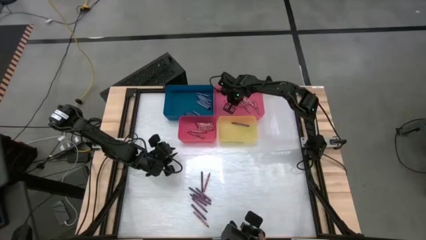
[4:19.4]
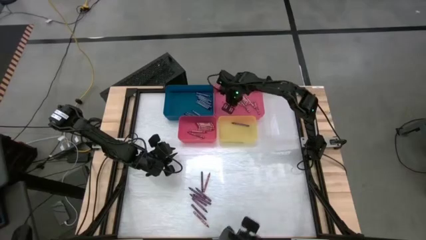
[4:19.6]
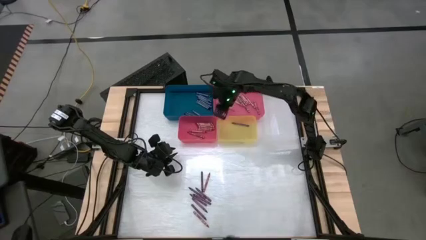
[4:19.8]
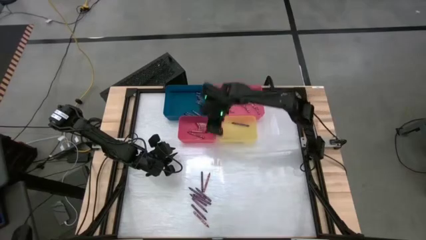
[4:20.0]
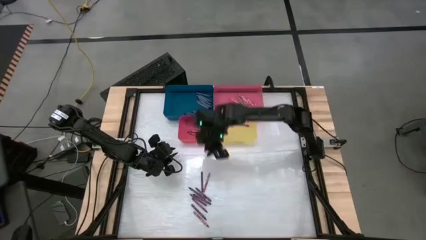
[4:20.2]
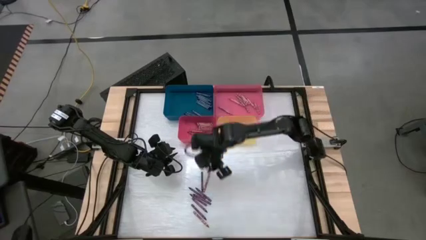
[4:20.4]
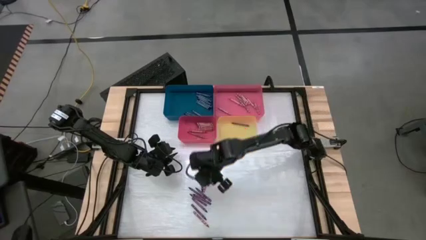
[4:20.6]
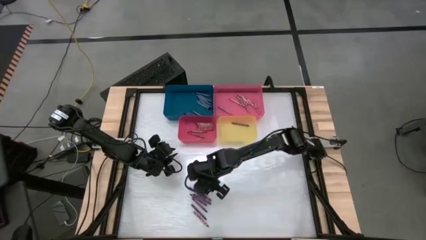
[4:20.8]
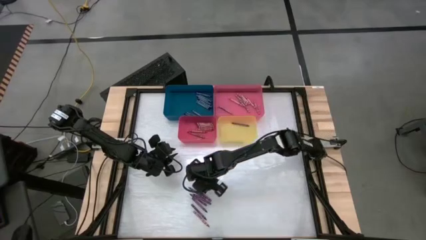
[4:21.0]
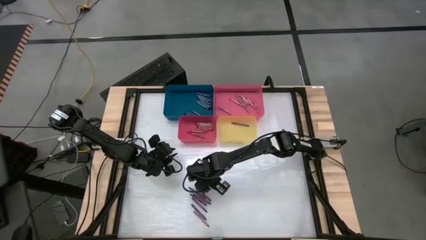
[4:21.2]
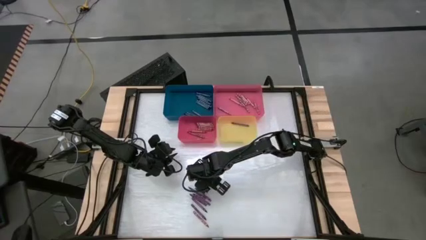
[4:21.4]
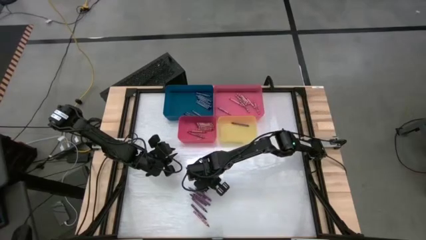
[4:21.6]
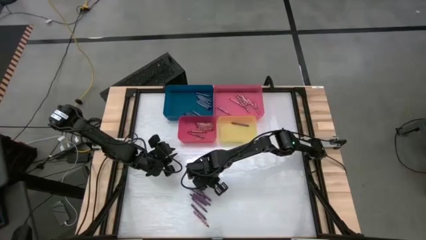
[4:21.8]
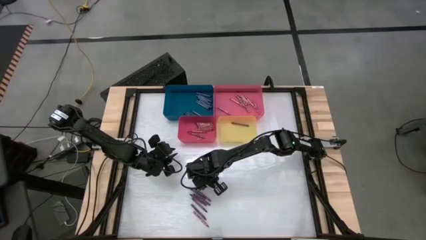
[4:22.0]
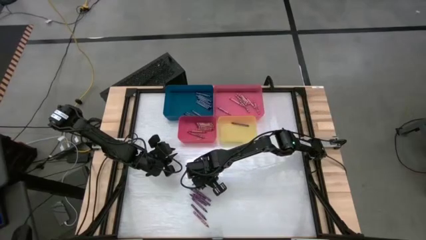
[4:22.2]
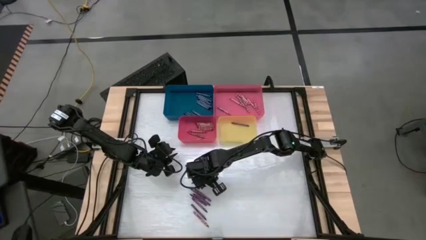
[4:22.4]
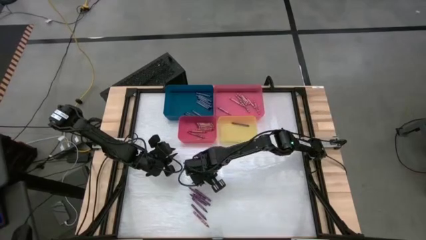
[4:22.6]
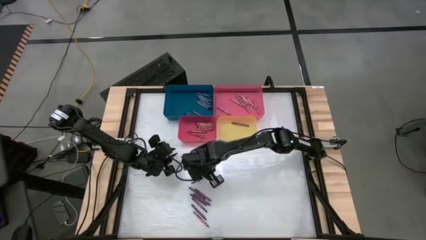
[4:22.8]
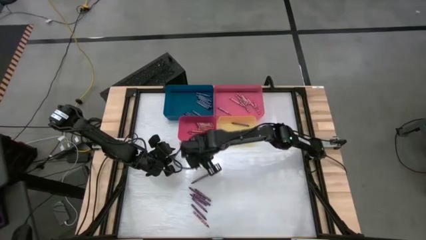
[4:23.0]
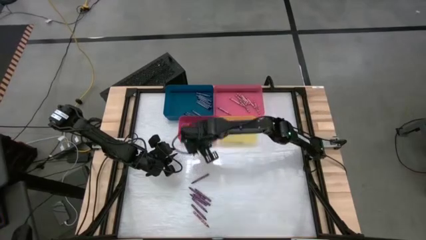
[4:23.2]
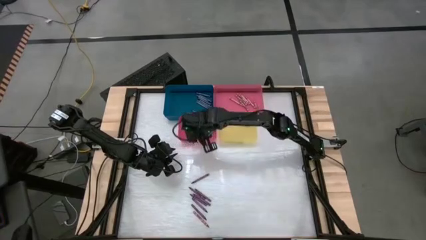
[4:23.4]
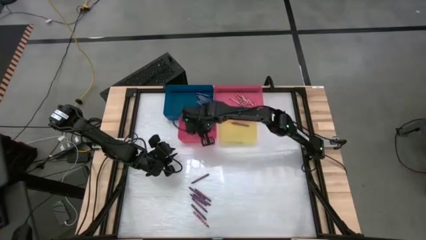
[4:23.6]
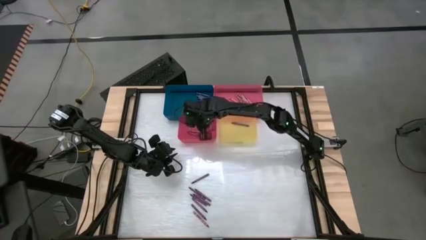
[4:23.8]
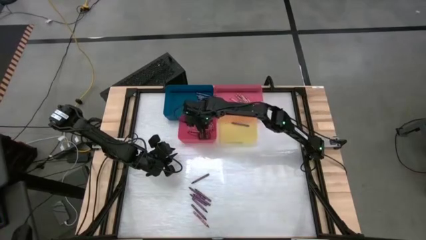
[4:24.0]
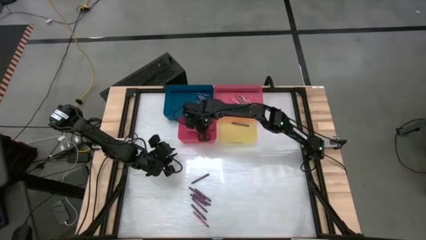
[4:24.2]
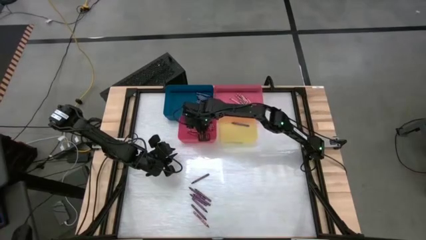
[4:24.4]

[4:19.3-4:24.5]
Task: Sort crayons
Put the red crayon into the red bin

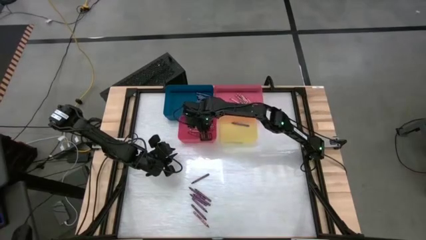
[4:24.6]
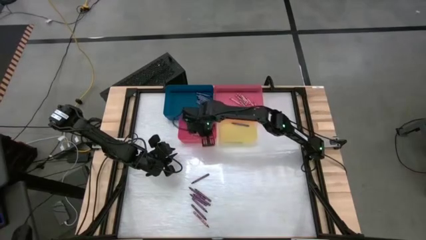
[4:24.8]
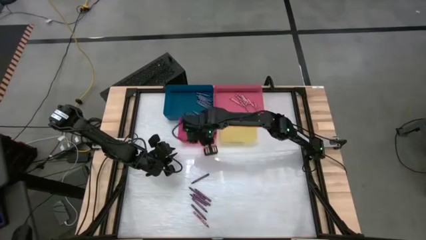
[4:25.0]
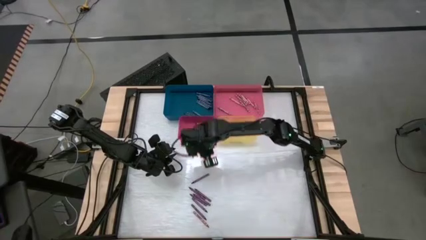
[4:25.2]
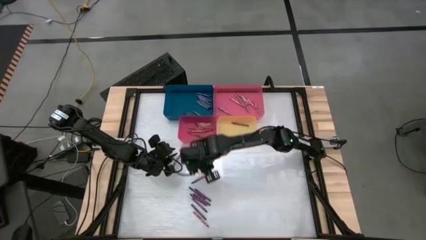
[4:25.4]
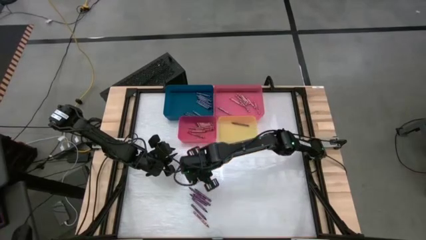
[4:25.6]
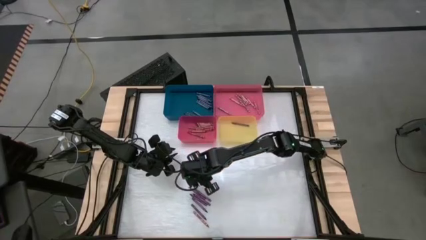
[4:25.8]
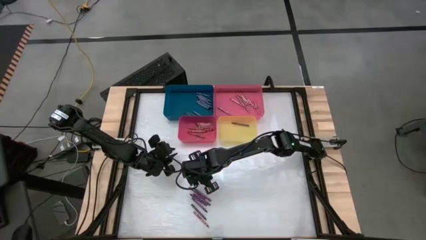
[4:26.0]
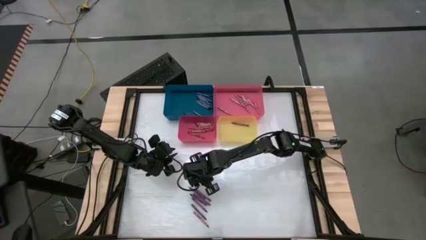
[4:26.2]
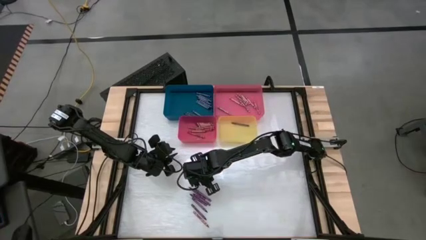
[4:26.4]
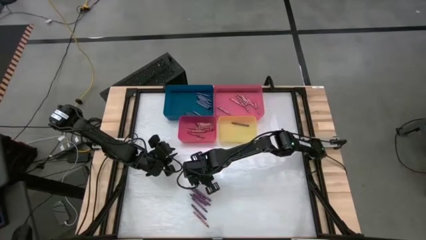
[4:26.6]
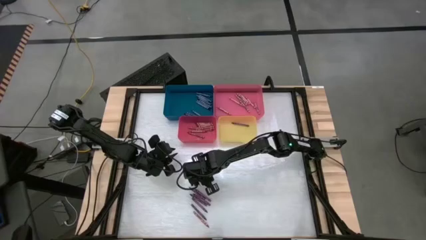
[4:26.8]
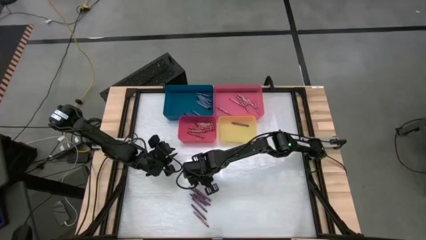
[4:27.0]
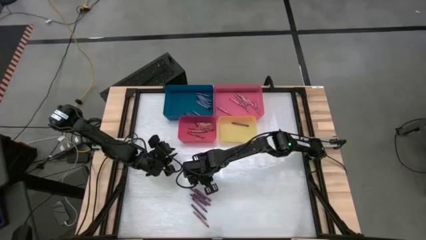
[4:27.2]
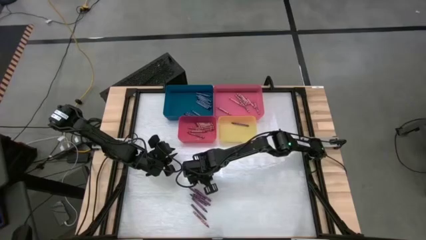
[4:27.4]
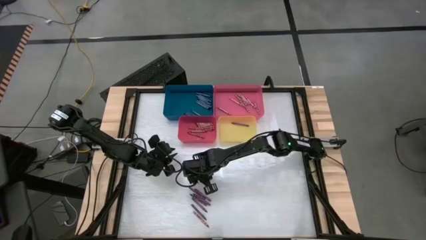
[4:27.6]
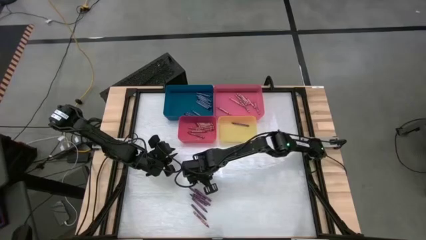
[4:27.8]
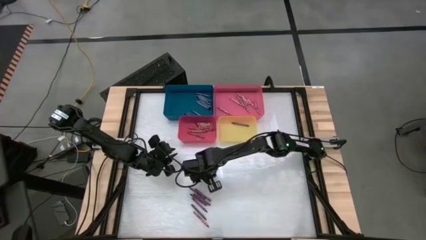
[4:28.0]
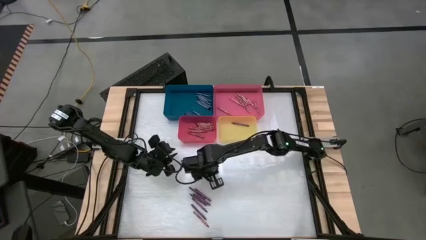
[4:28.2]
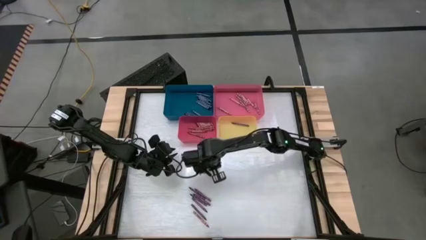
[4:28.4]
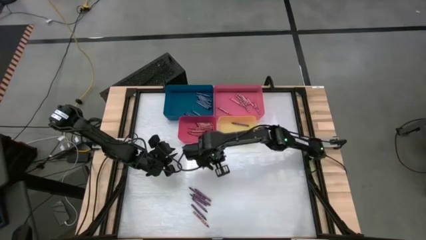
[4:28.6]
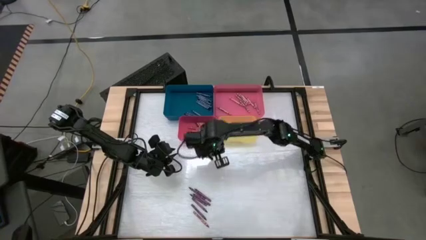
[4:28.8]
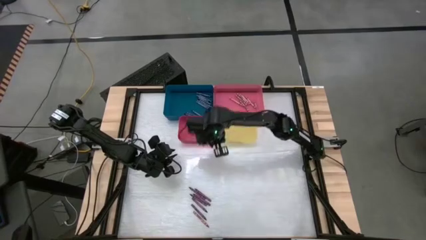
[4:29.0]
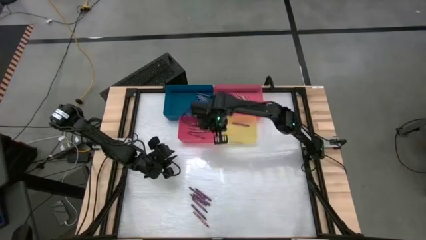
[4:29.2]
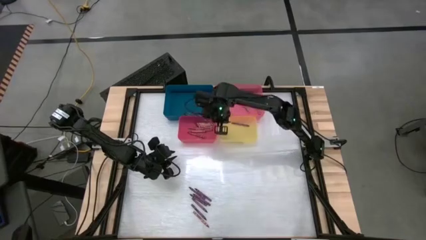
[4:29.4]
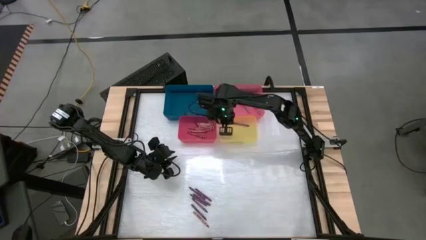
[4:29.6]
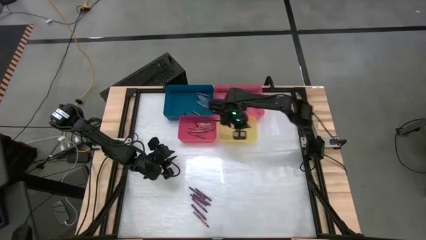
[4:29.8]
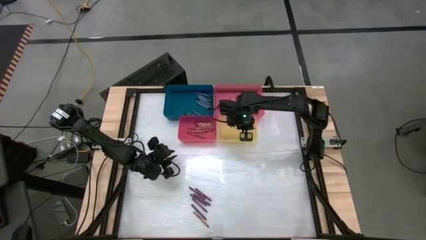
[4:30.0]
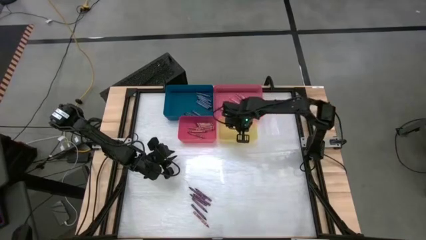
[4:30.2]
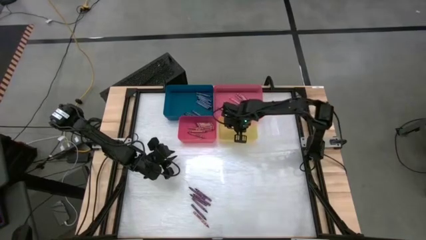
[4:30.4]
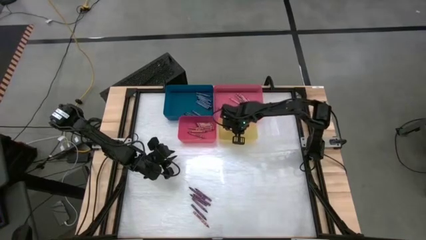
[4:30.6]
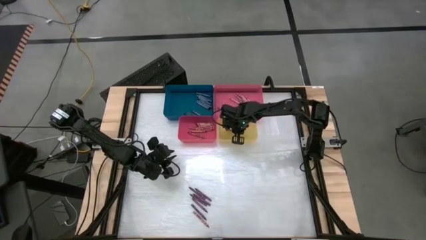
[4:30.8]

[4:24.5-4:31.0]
Put the violet crayon into the yellow bin
